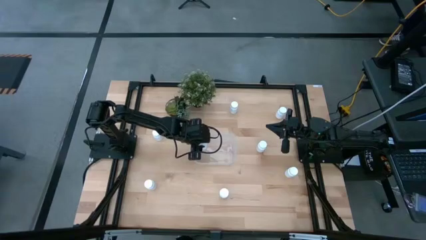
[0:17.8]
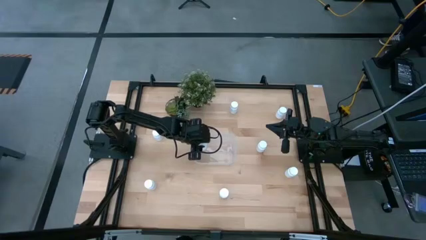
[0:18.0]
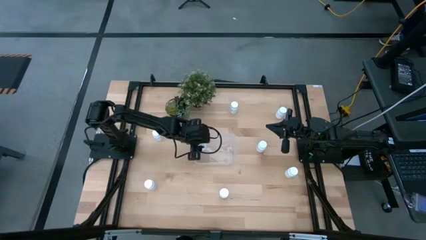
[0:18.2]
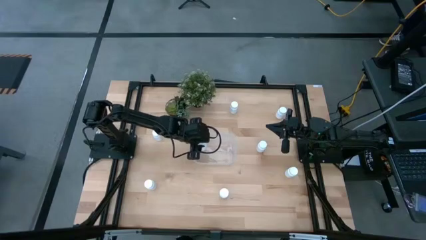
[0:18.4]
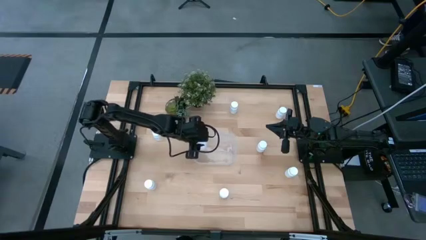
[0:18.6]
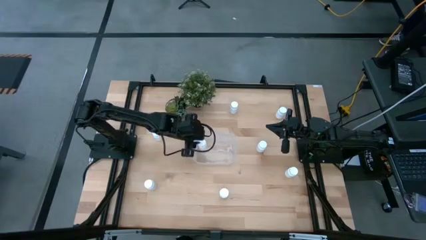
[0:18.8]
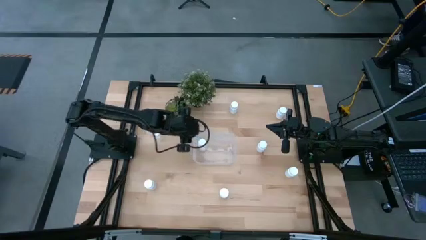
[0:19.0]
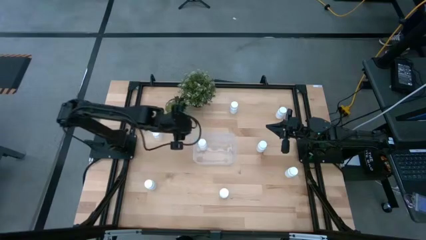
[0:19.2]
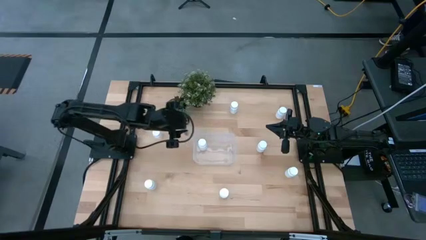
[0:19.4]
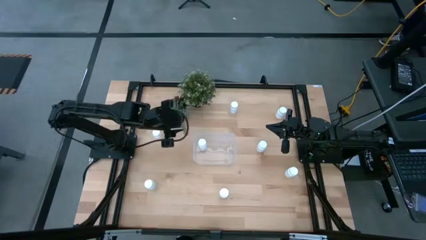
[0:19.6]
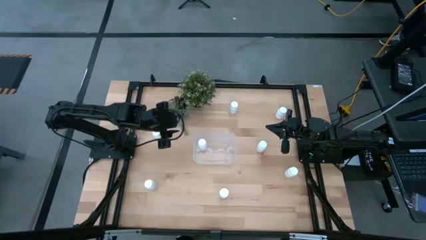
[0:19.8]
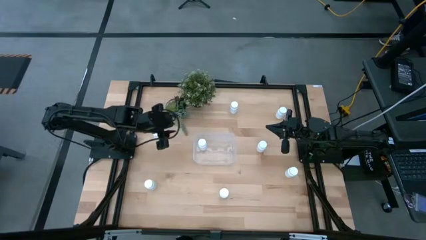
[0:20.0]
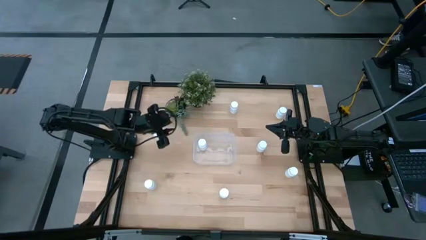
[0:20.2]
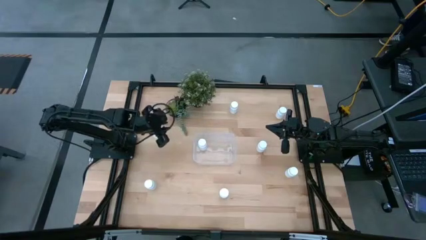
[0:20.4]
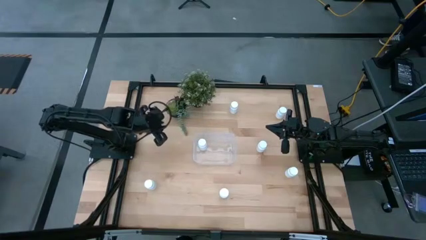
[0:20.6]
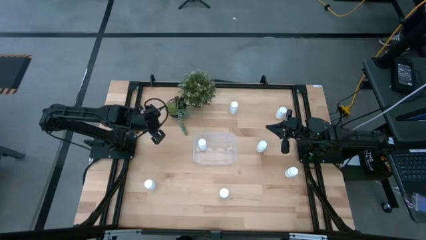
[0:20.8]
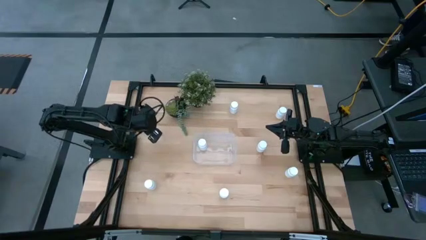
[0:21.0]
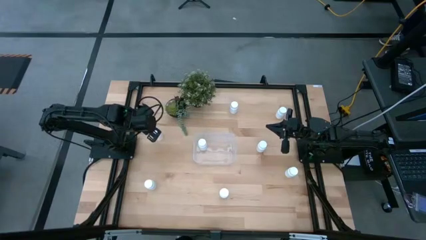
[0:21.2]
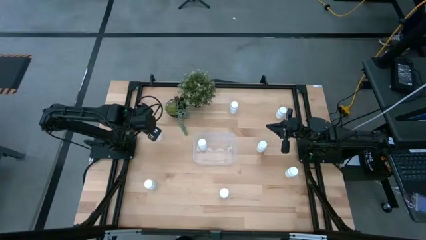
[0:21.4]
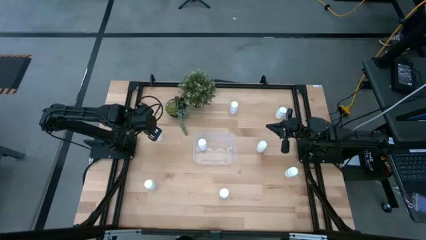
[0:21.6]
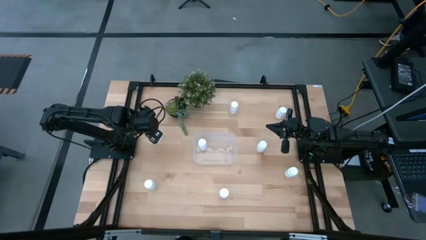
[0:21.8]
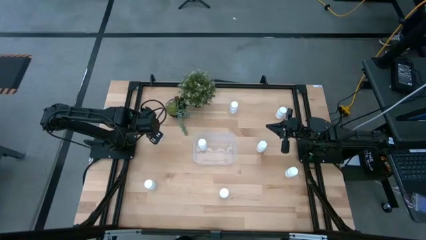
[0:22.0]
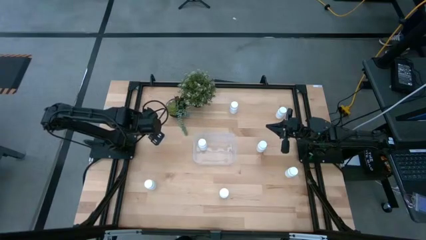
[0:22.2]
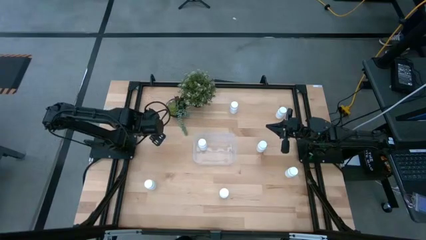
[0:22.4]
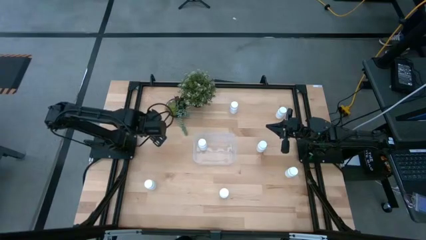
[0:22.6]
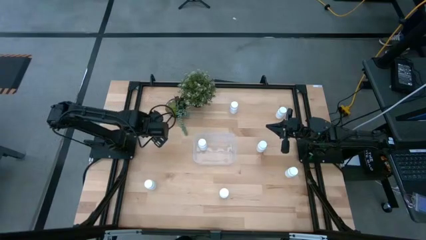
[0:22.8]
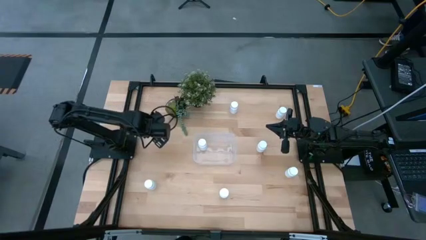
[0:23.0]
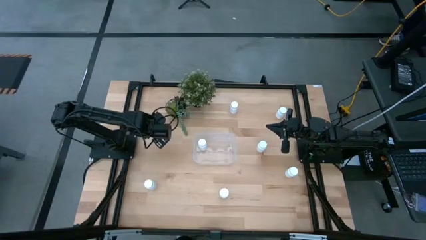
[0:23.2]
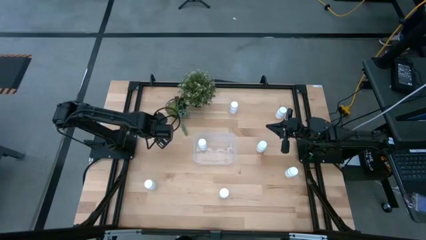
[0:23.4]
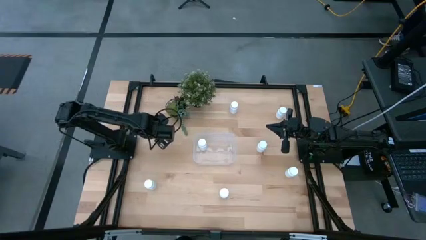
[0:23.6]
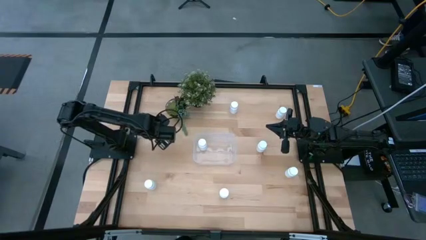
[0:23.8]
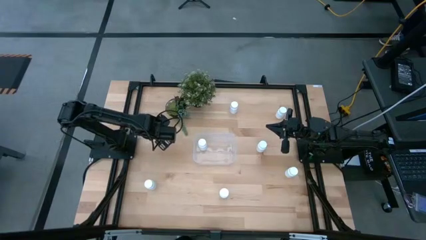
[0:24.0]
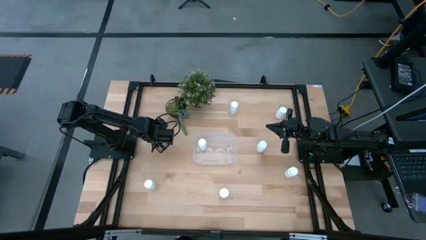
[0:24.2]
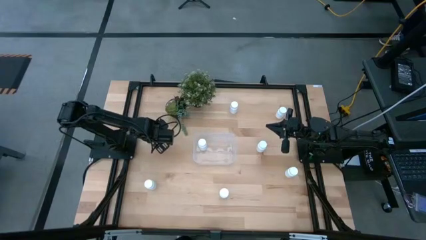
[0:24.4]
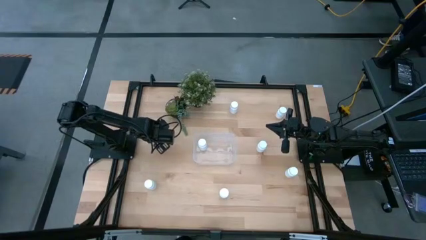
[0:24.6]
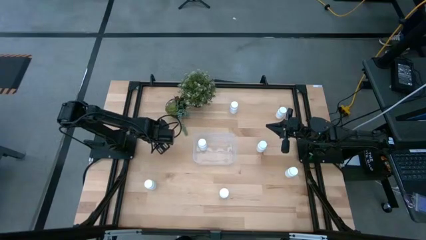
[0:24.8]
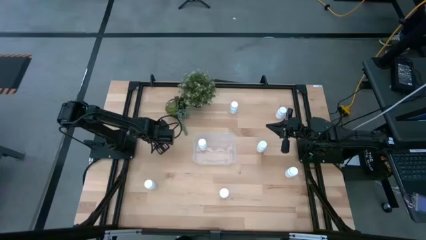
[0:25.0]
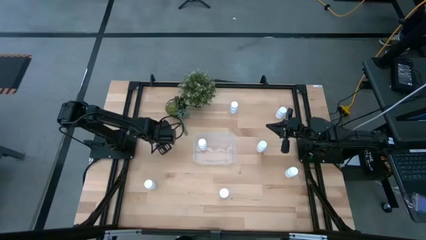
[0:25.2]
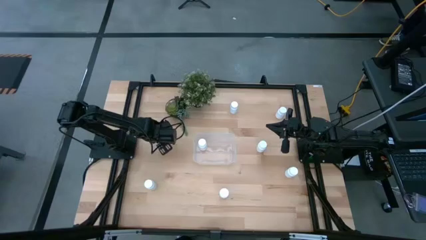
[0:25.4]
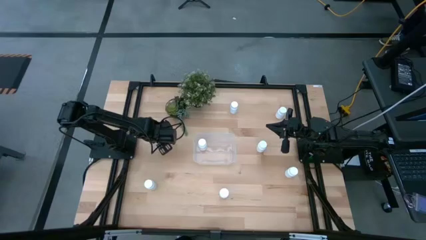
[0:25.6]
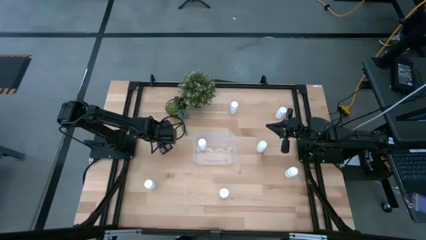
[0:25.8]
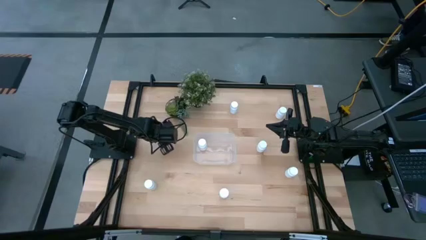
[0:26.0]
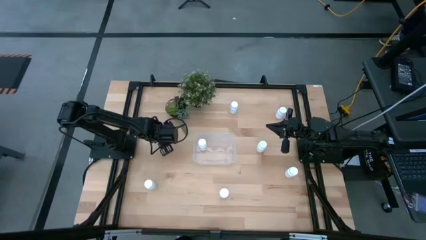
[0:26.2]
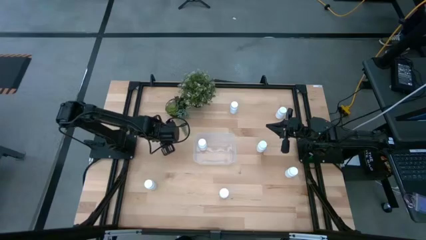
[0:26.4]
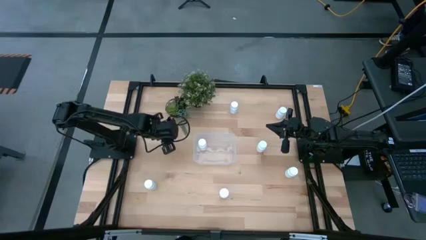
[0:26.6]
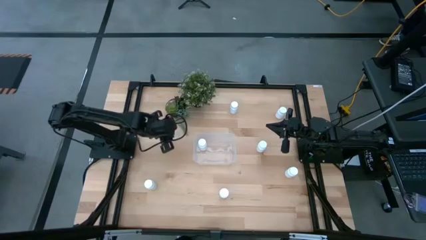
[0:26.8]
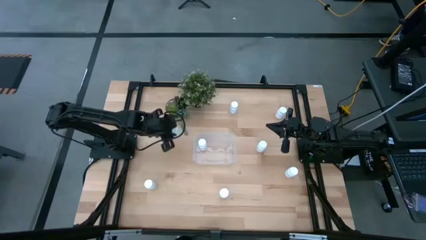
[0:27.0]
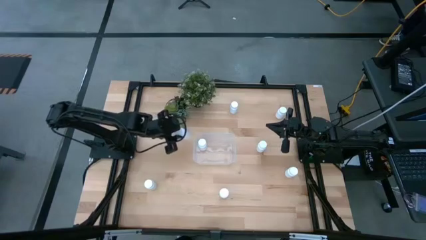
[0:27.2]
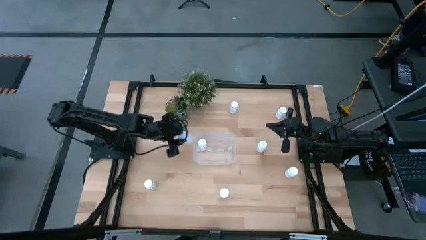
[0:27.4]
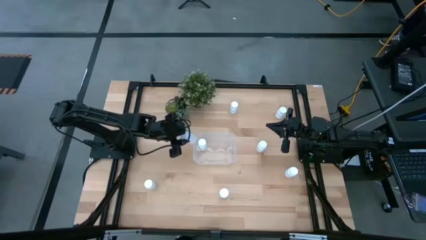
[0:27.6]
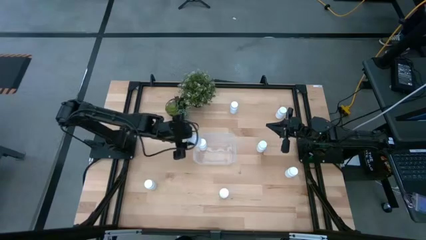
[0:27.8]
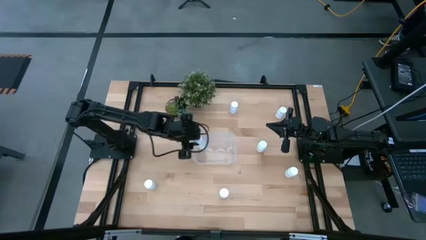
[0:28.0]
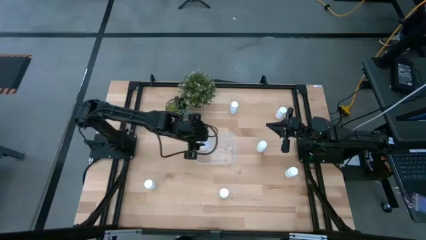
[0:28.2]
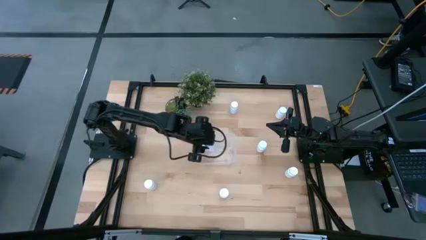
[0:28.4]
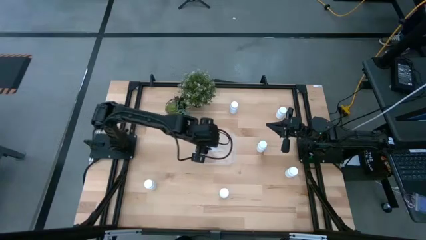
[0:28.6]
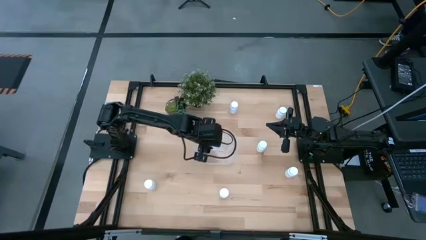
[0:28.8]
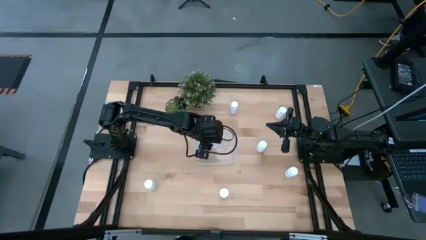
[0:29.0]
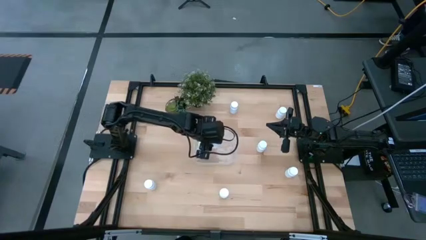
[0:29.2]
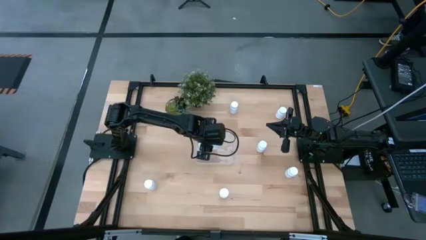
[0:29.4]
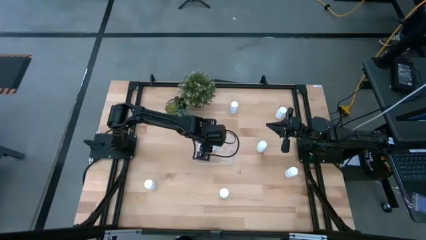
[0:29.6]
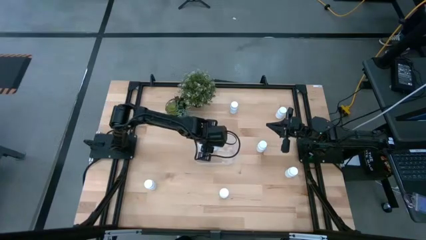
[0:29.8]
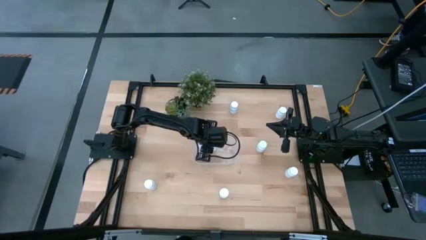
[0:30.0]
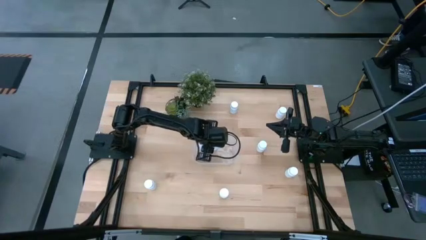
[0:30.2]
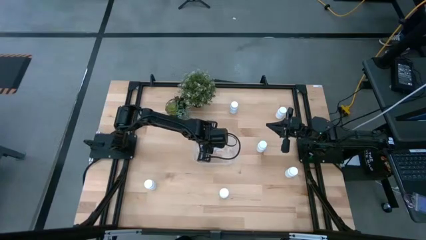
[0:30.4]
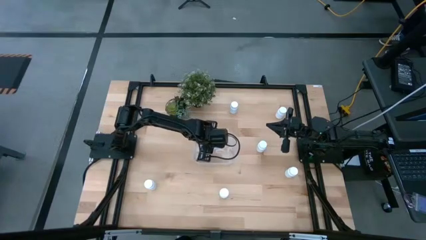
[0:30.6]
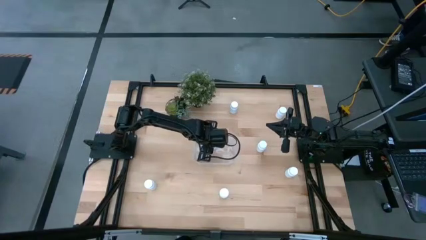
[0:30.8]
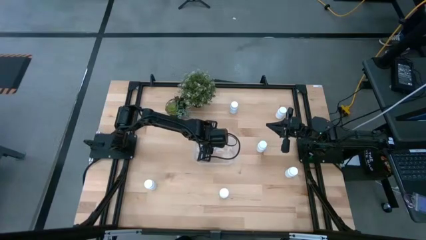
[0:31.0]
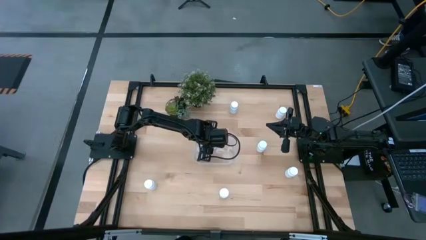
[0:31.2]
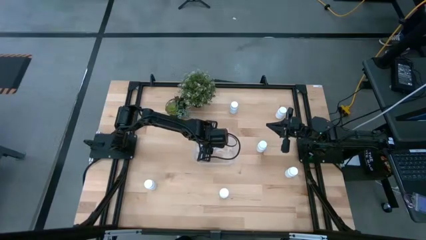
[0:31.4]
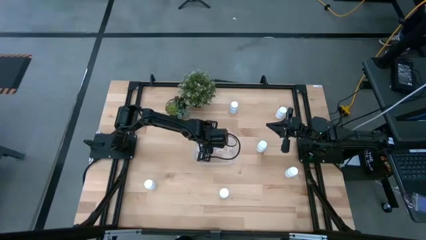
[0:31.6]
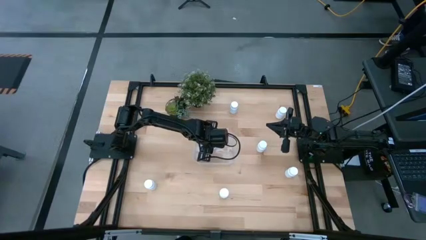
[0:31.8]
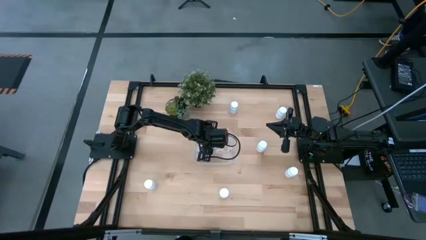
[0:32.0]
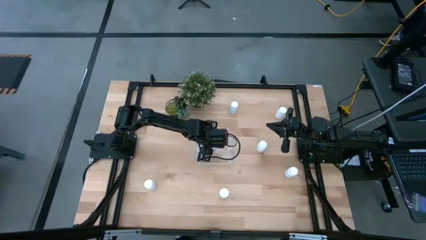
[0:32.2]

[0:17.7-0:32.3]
Task: Pick and place pill bottles into a basket
Put the pill bottle into the bin
